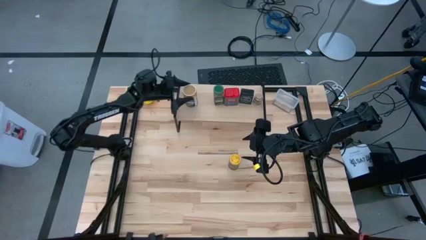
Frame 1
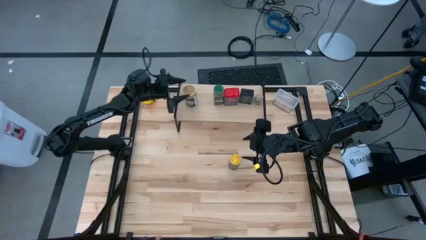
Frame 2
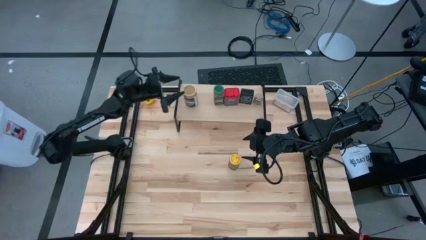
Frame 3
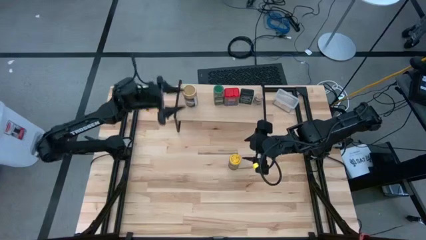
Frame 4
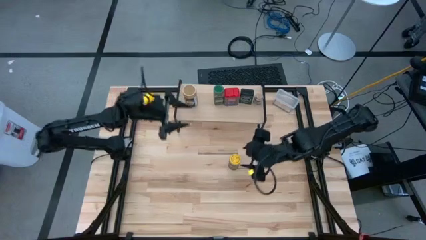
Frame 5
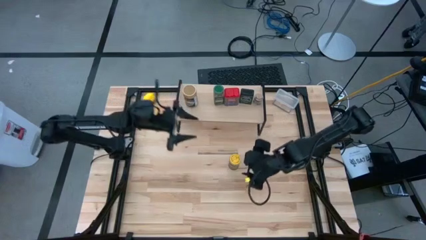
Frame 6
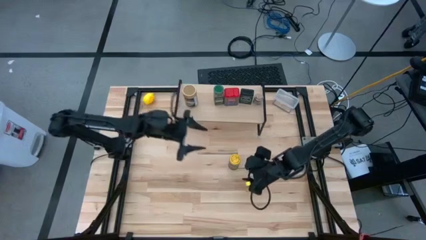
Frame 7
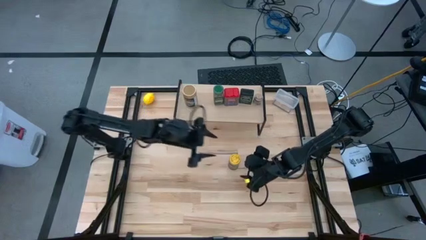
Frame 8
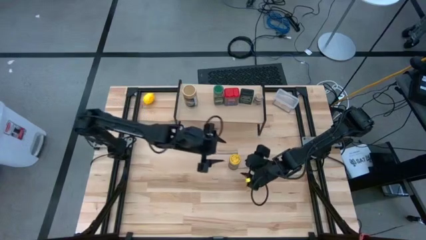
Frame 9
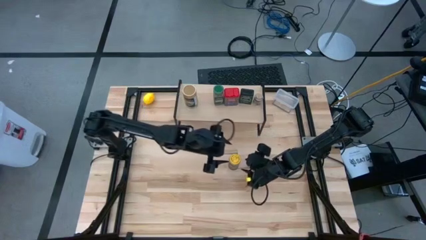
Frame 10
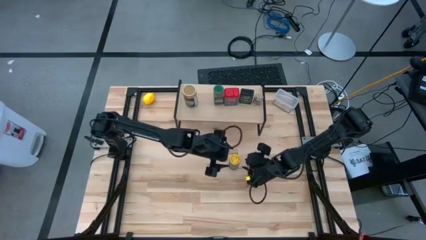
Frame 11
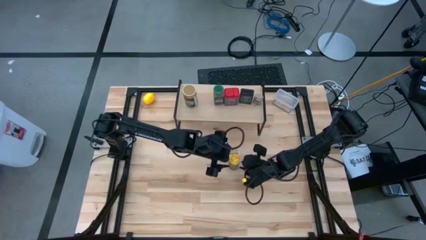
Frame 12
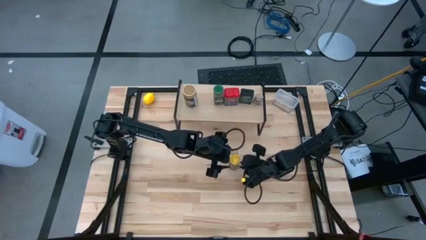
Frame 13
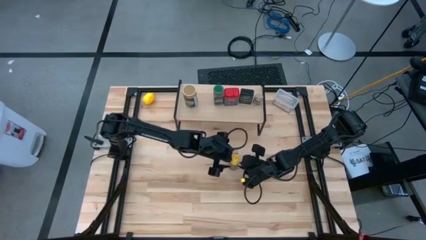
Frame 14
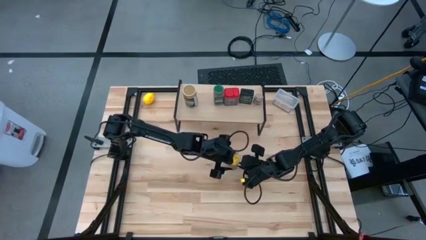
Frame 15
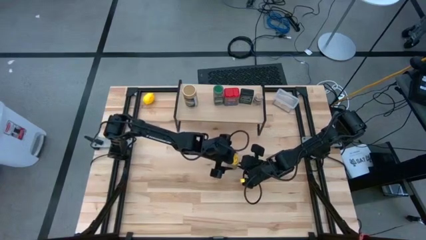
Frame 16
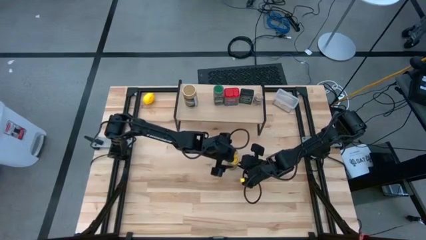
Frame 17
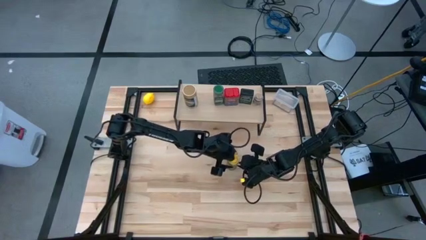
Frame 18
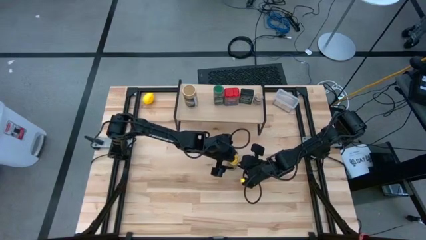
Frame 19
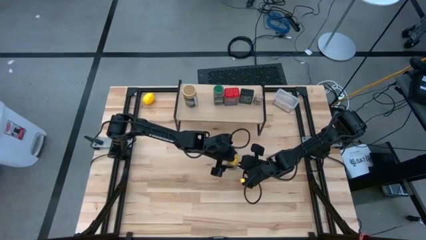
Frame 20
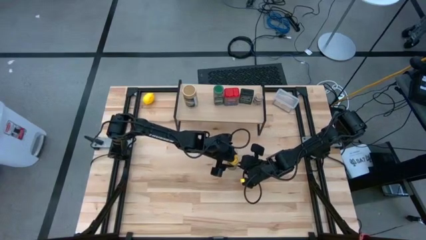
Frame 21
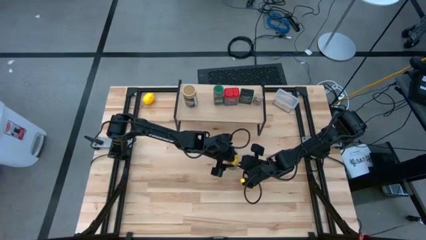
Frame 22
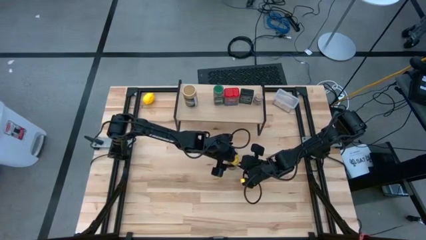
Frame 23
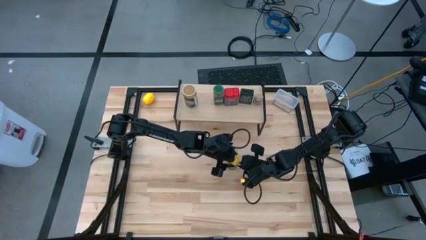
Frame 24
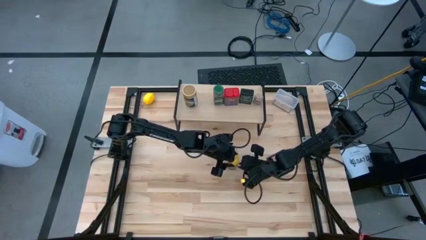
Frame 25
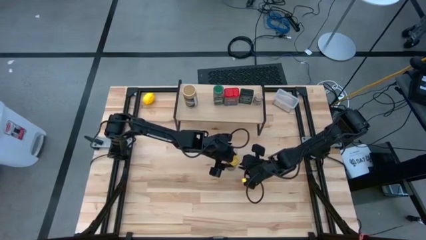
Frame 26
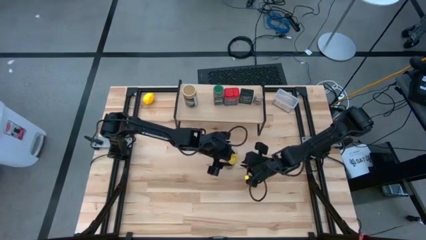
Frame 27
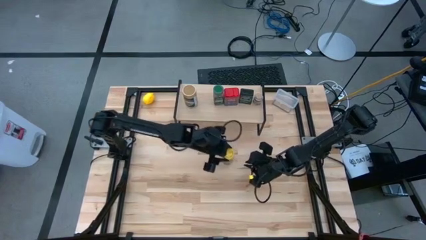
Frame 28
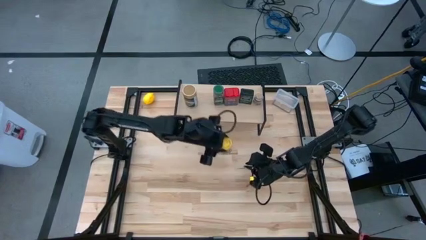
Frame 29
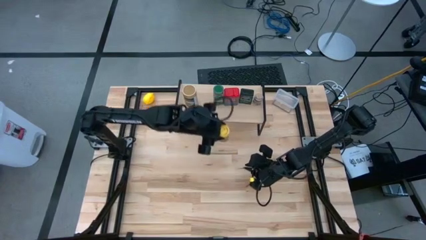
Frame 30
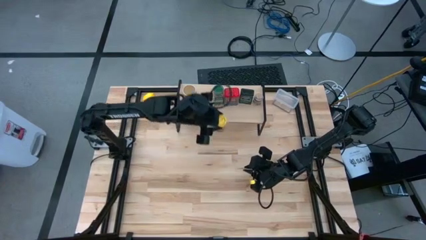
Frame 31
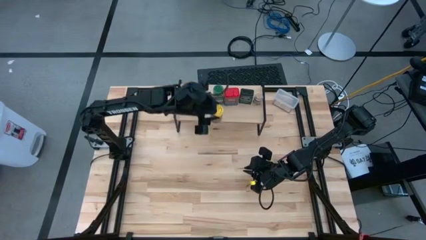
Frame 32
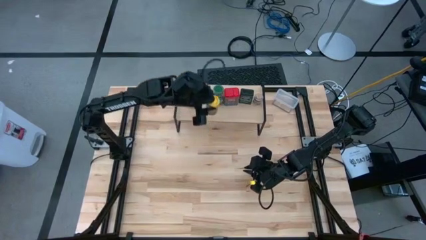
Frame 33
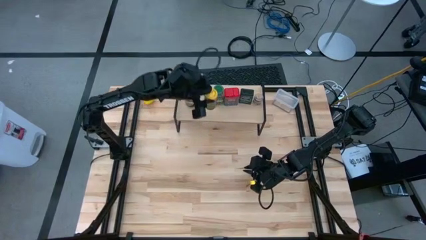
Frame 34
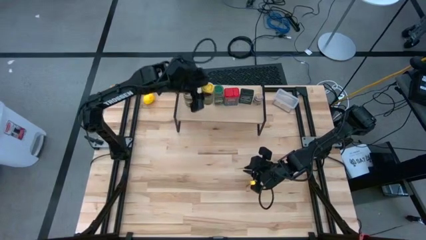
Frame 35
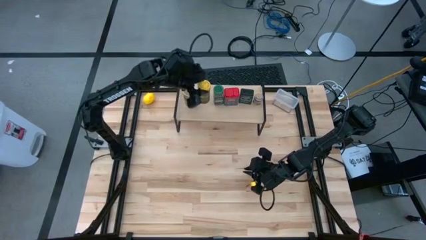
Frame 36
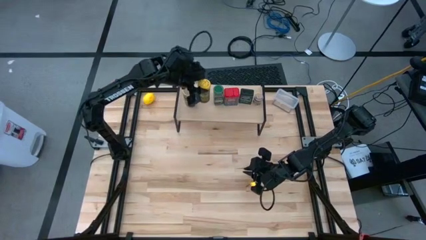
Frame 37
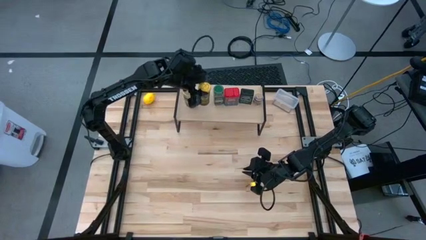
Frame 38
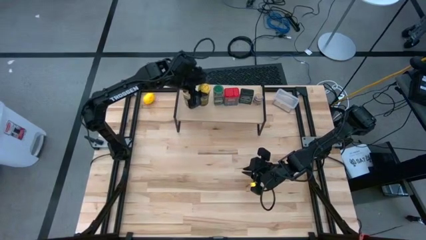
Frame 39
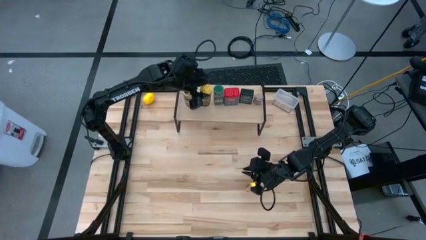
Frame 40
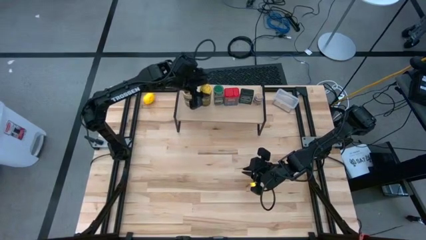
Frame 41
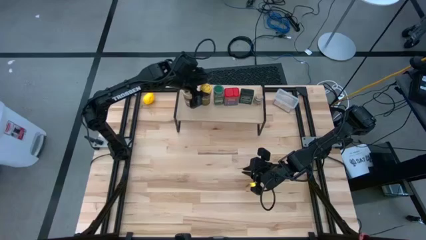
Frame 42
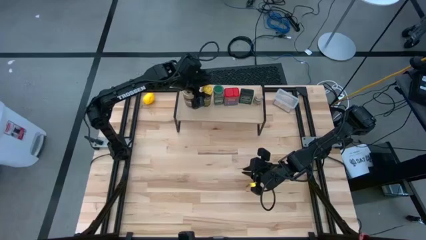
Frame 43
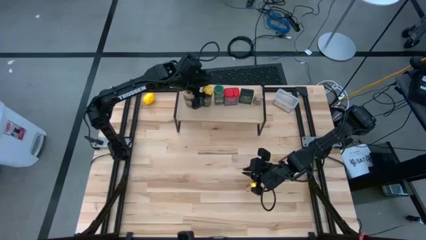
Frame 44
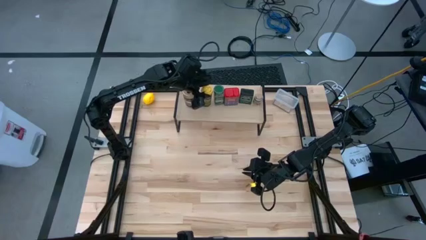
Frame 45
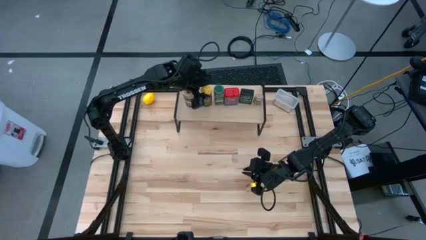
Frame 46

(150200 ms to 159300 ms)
Task: Shelf spices
Put the yellow seasoning bottle on the shelf

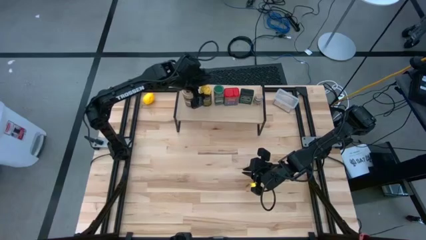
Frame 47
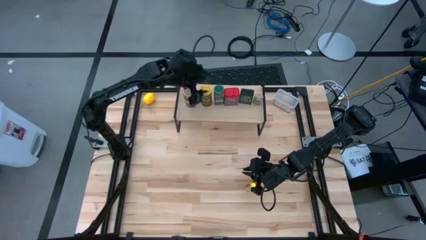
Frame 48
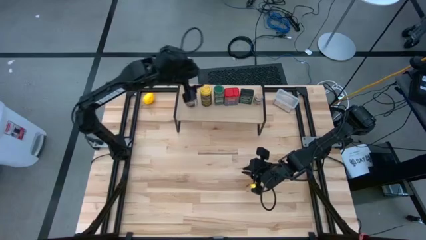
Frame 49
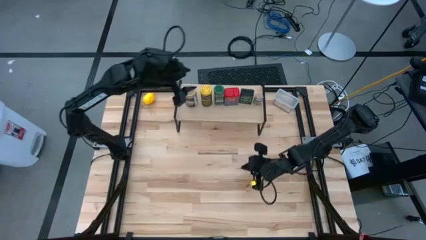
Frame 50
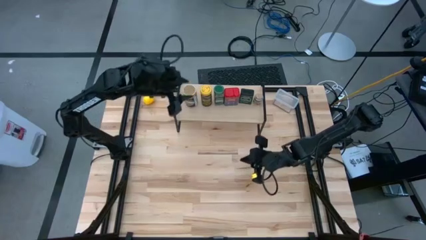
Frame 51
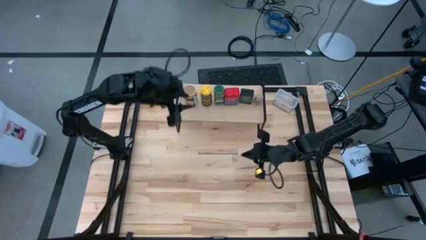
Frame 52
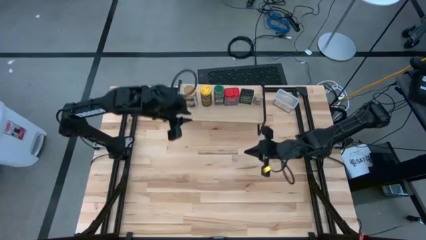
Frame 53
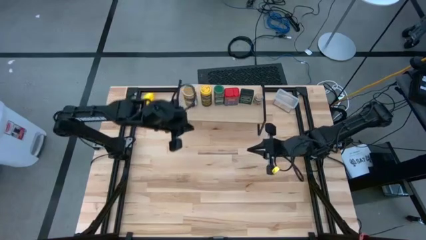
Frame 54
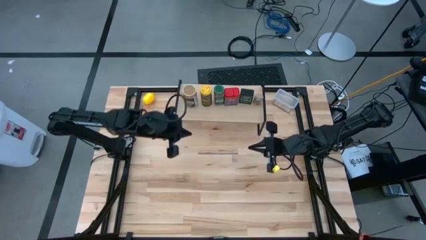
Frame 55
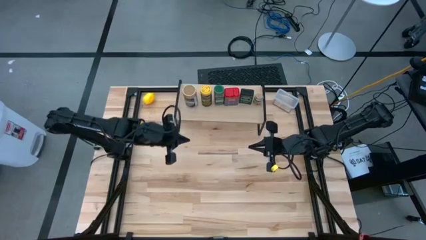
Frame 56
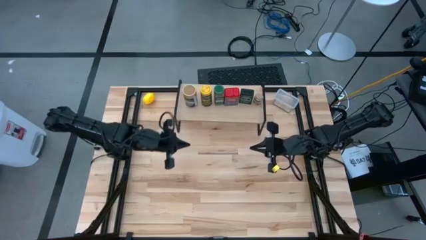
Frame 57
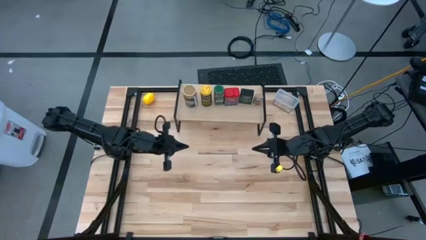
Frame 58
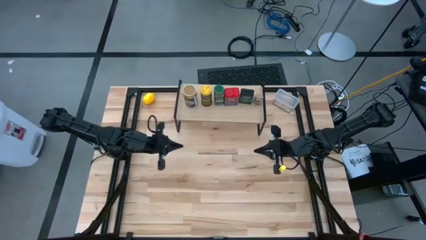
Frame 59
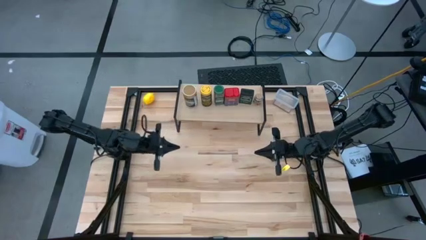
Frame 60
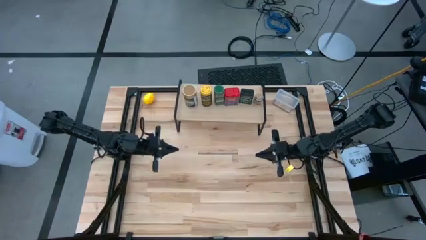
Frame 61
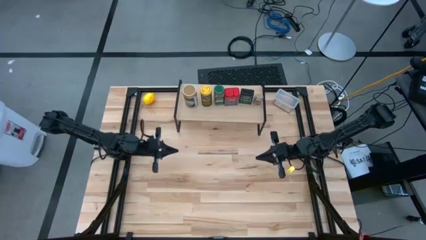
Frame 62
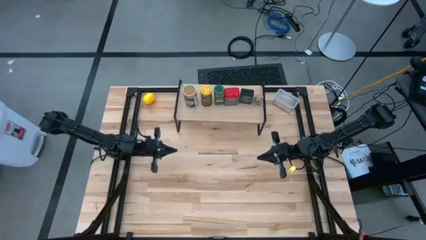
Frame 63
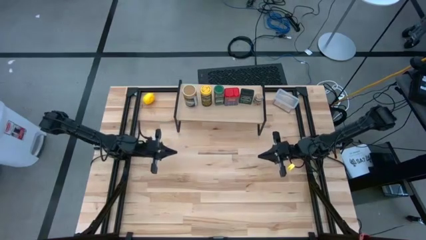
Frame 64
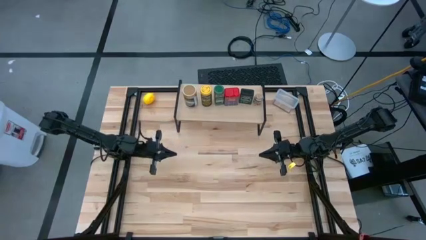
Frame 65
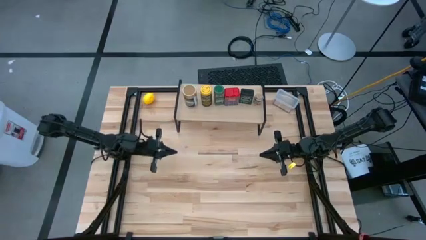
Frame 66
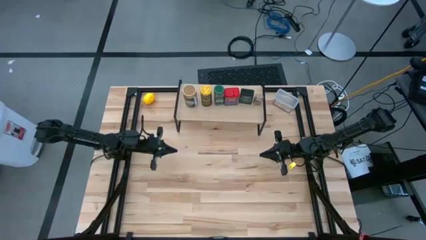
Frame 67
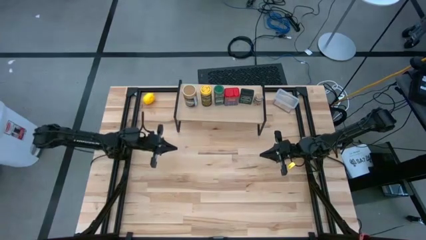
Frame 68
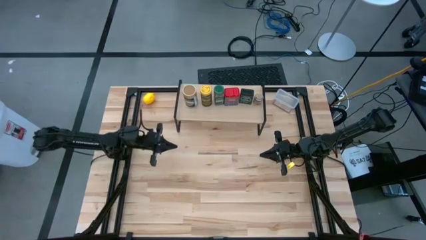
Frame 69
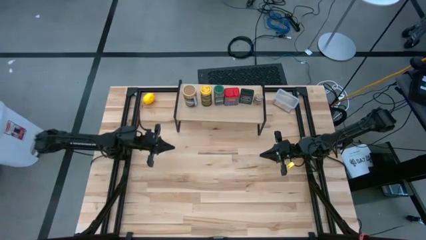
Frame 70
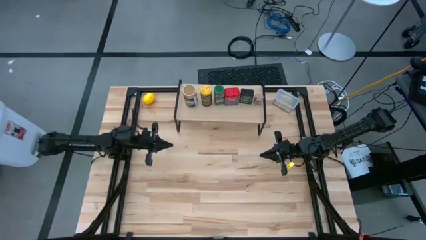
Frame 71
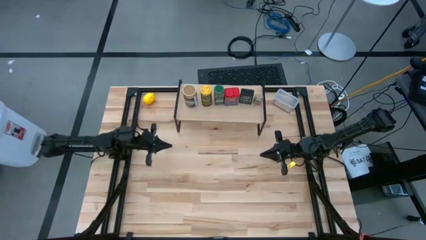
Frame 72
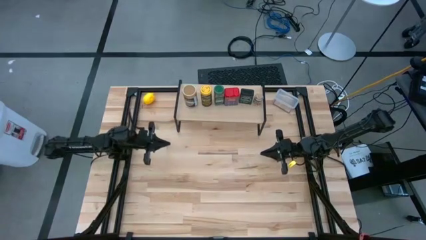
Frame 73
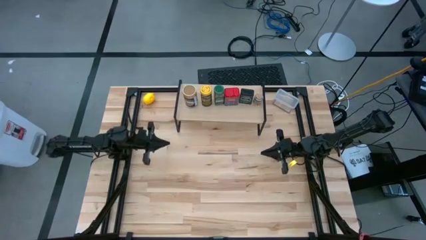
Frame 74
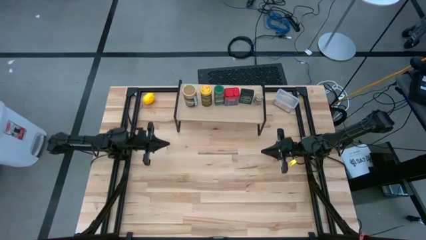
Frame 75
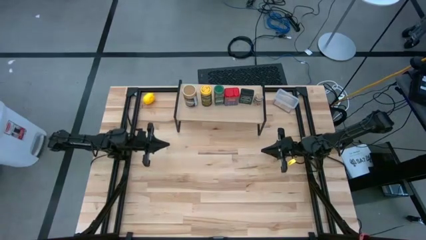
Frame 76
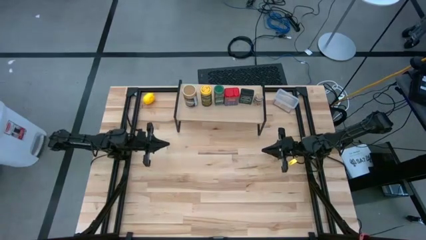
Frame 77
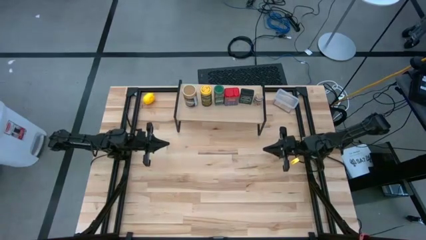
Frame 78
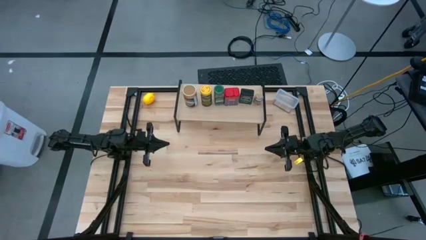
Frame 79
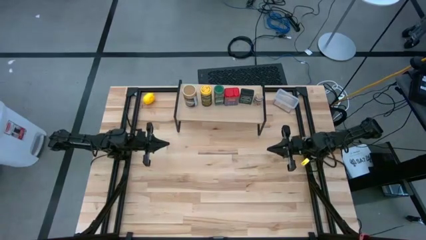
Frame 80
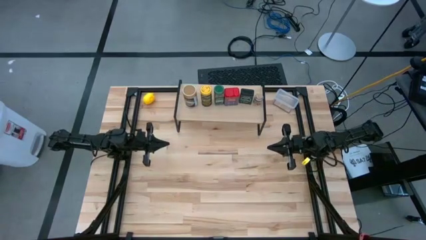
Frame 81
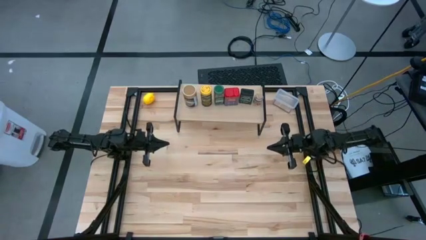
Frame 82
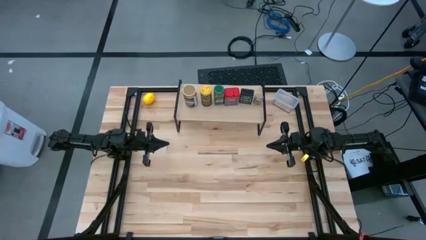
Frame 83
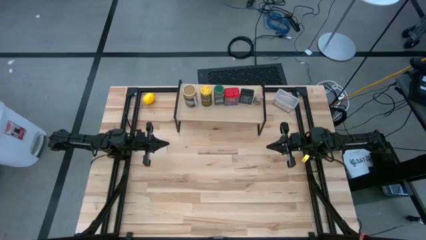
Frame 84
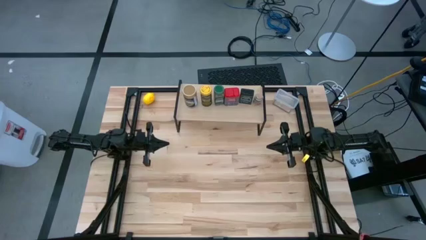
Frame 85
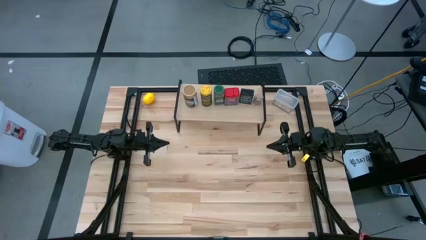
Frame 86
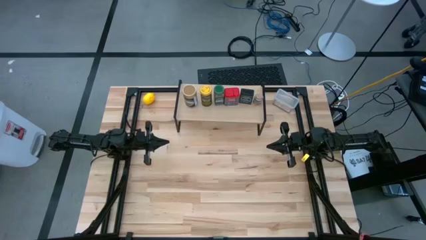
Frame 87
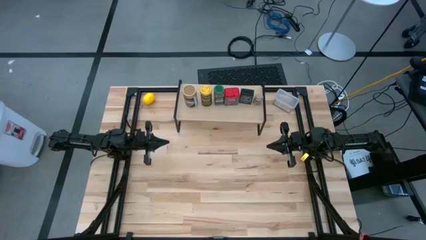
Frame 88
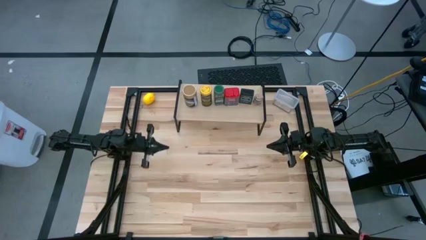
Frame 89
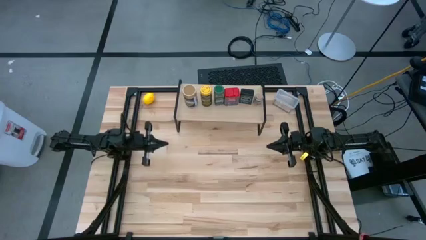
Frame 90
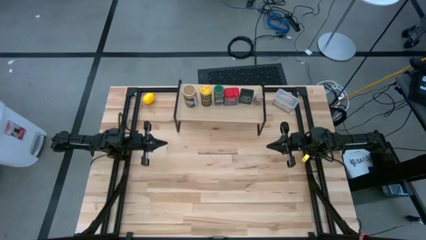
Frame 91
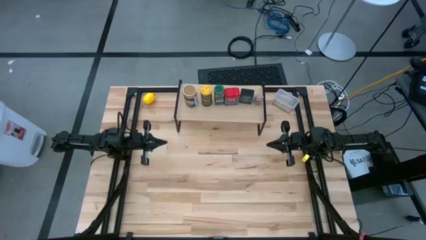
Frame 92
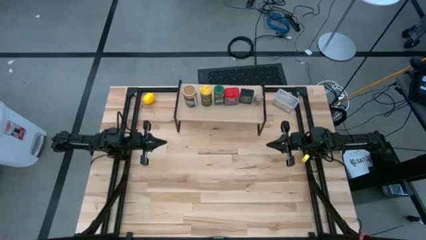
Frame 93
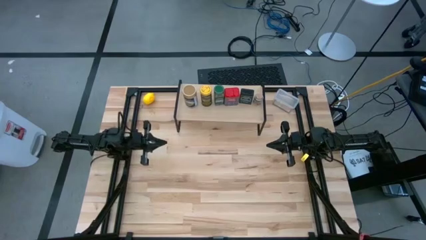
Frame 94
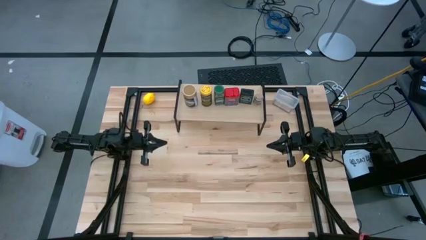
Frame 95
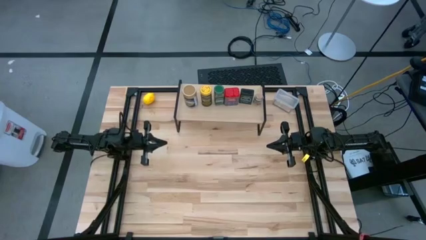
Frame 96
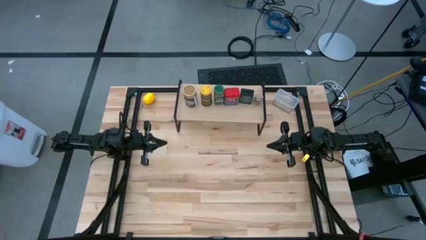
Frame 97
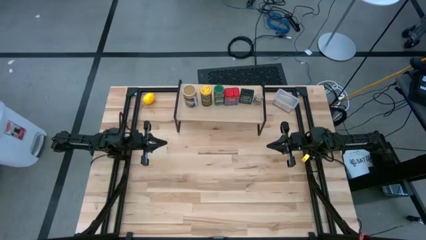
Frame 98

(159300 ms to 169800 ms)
Return to Home Position
